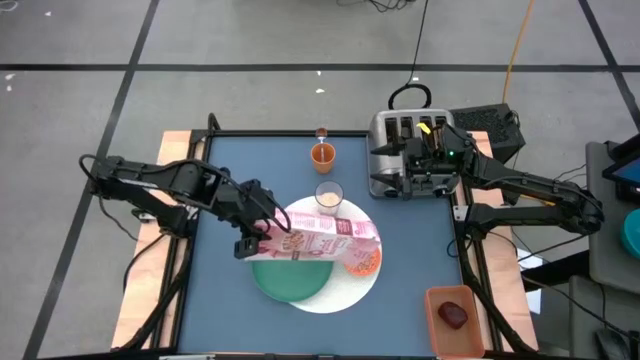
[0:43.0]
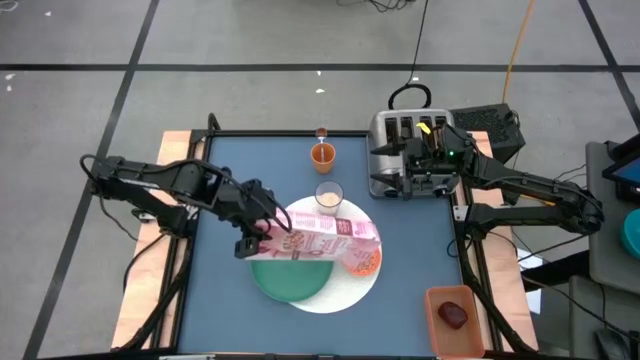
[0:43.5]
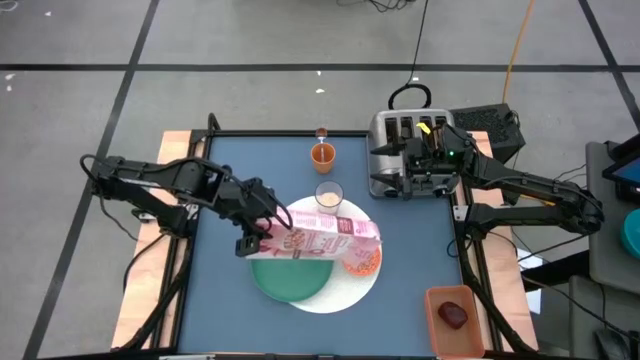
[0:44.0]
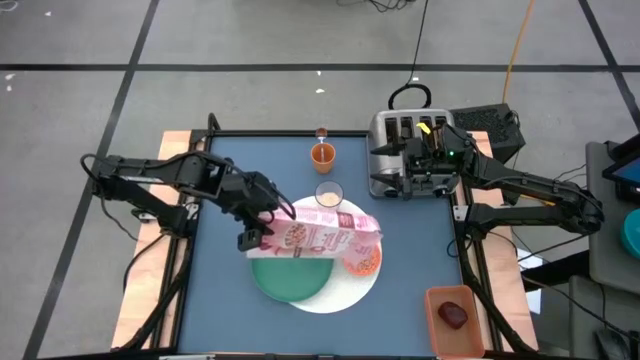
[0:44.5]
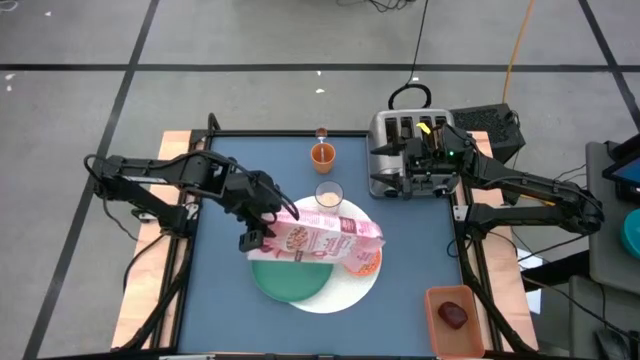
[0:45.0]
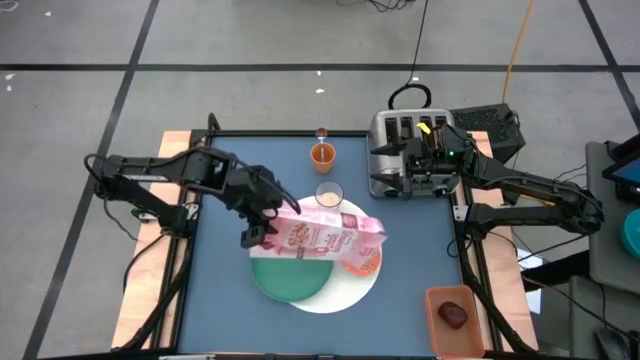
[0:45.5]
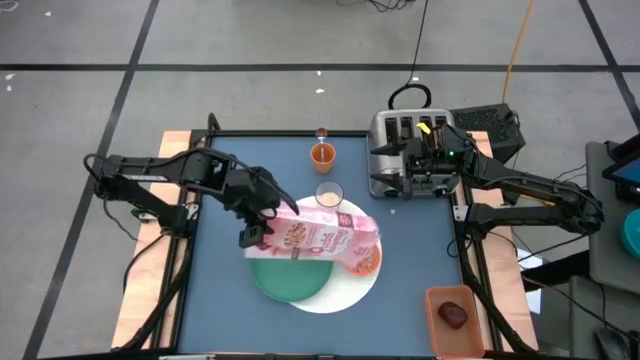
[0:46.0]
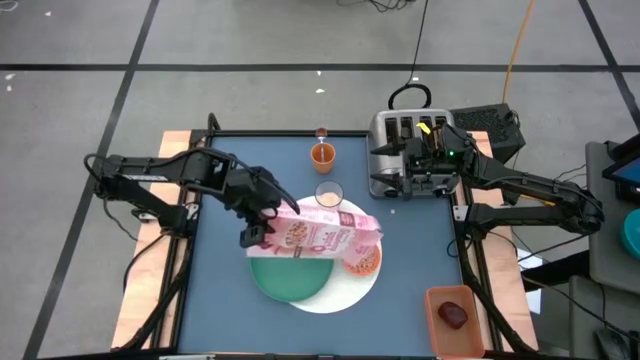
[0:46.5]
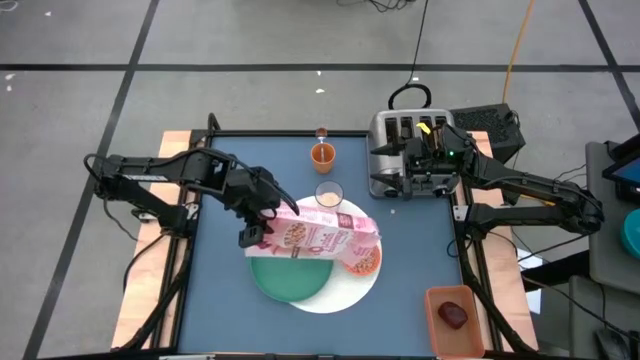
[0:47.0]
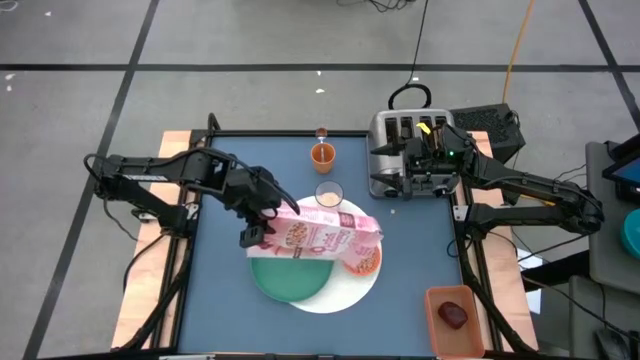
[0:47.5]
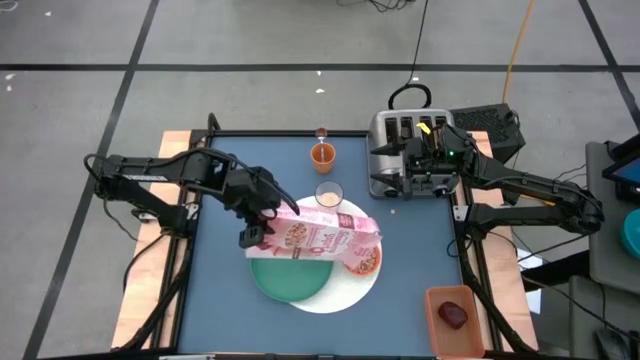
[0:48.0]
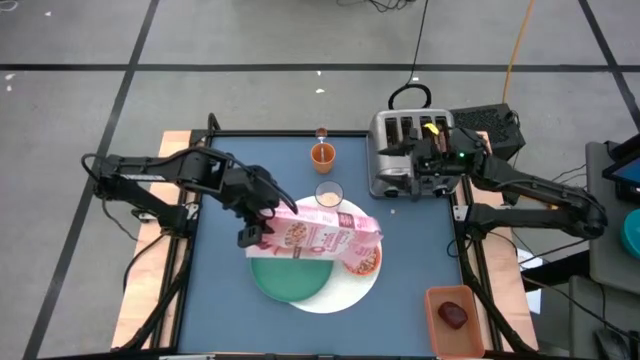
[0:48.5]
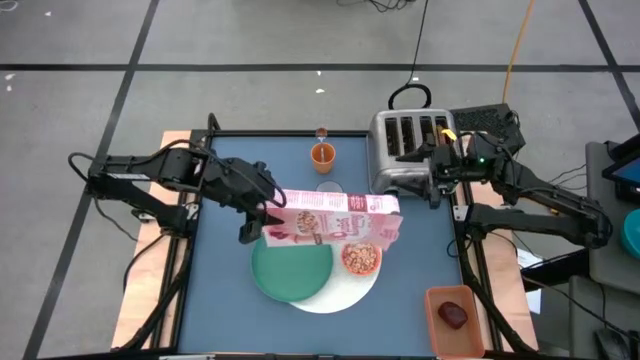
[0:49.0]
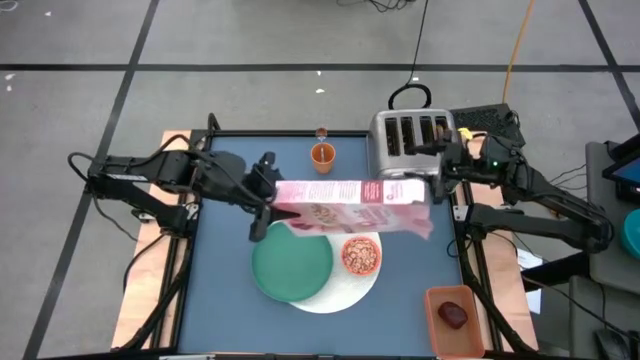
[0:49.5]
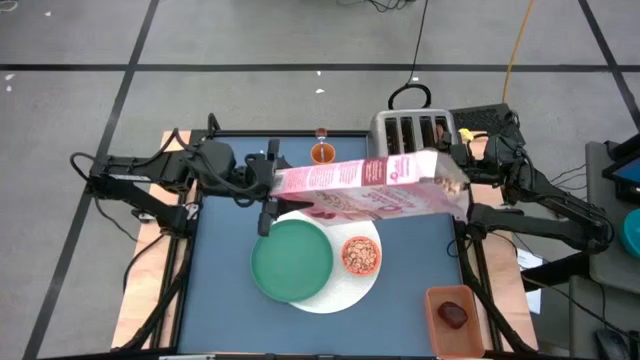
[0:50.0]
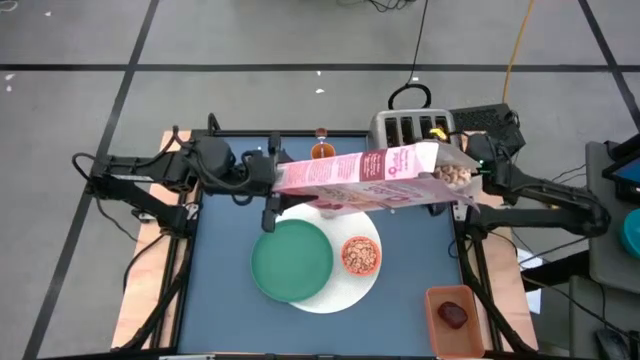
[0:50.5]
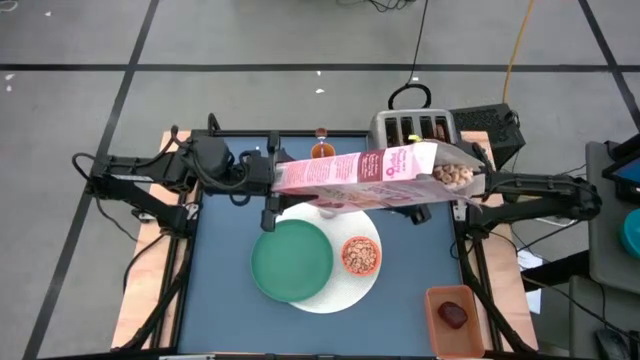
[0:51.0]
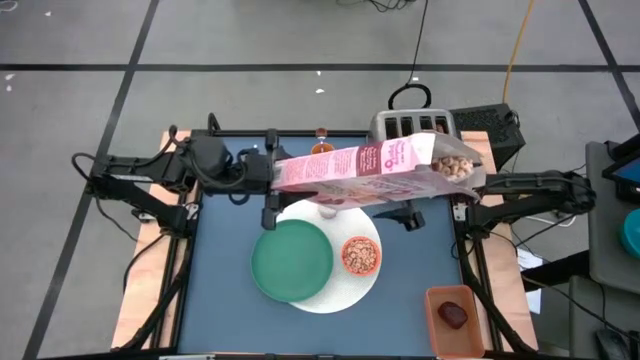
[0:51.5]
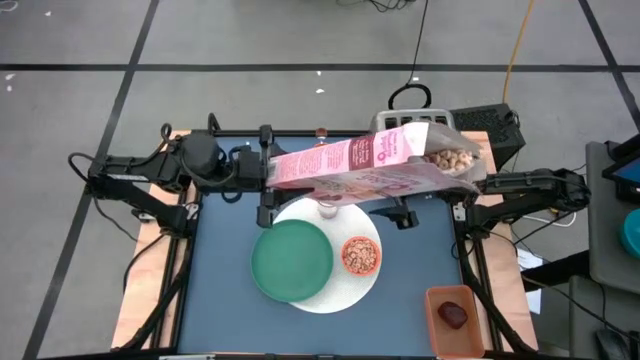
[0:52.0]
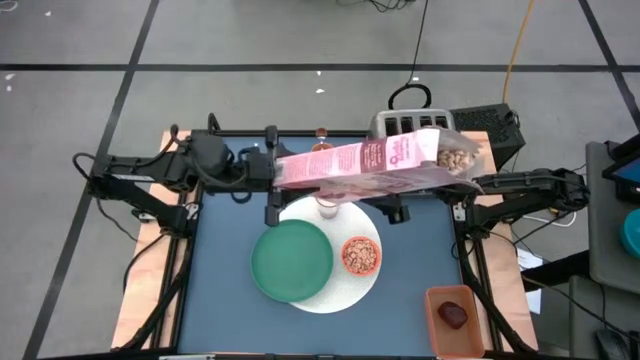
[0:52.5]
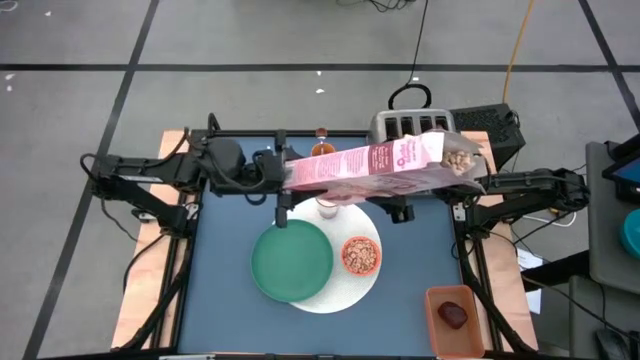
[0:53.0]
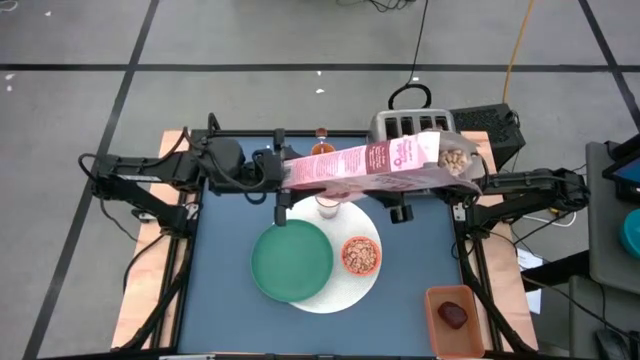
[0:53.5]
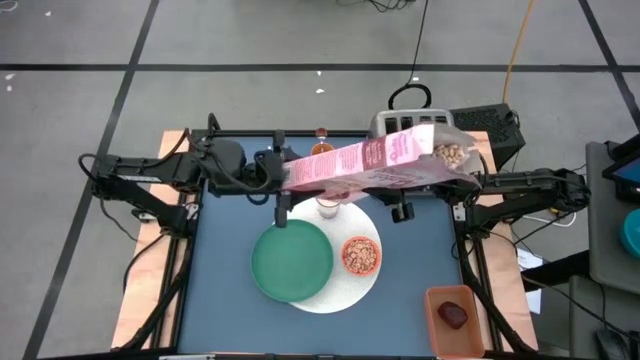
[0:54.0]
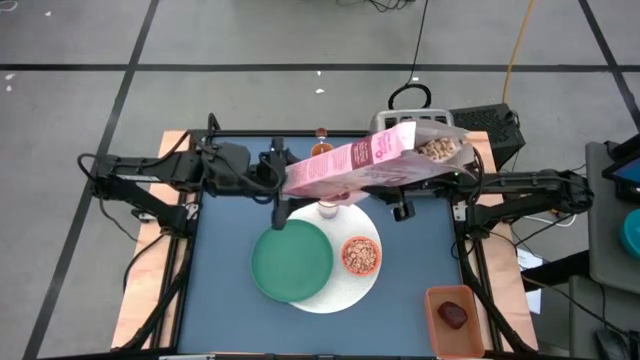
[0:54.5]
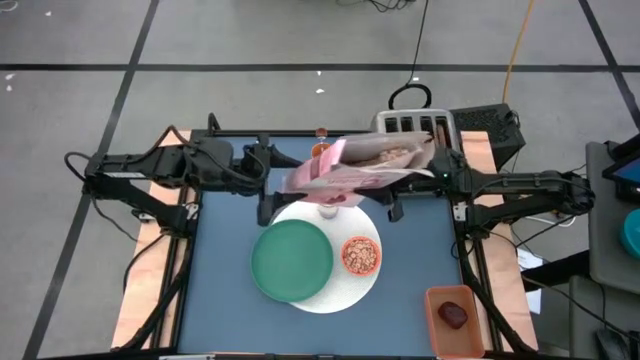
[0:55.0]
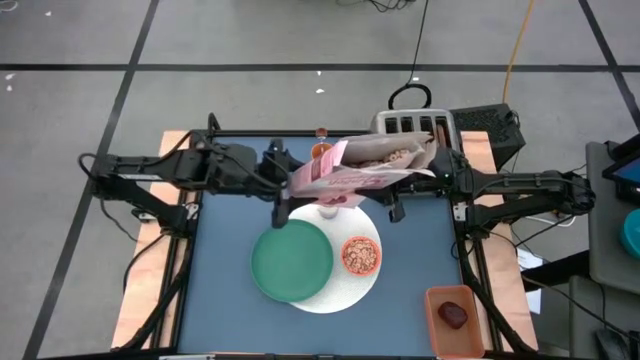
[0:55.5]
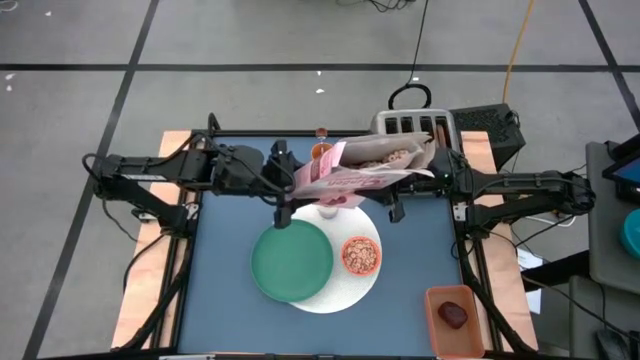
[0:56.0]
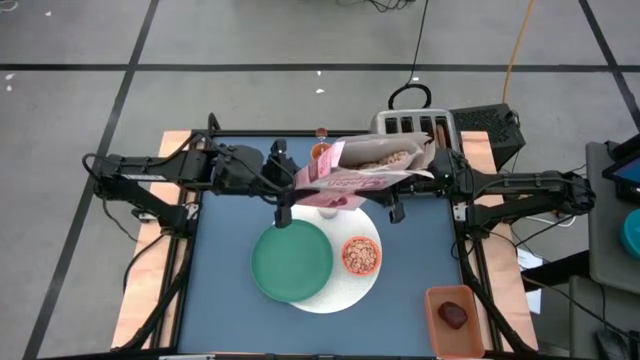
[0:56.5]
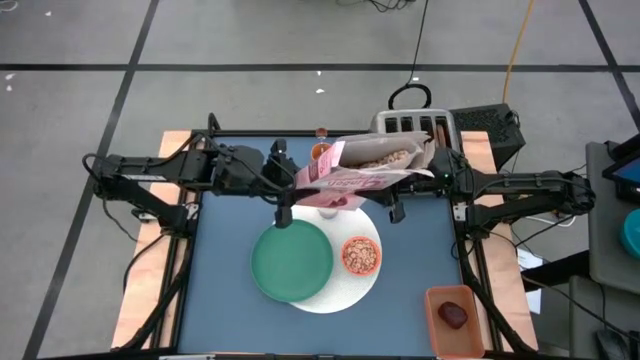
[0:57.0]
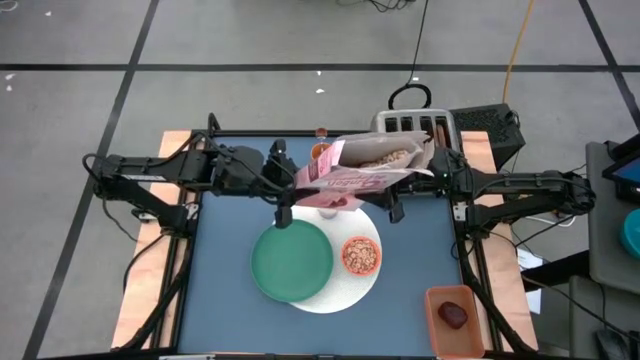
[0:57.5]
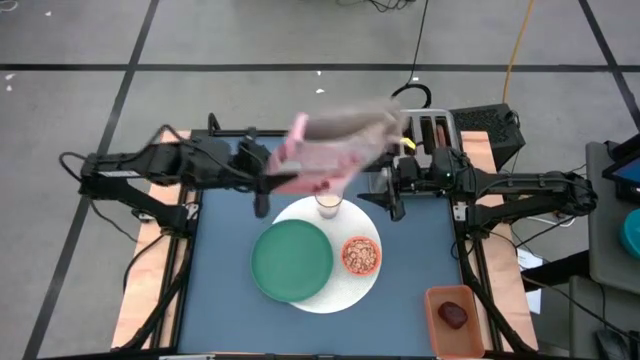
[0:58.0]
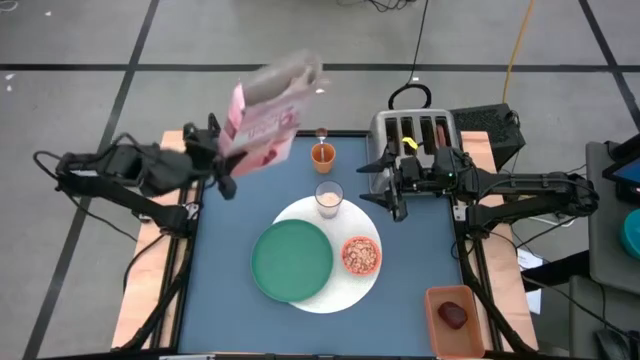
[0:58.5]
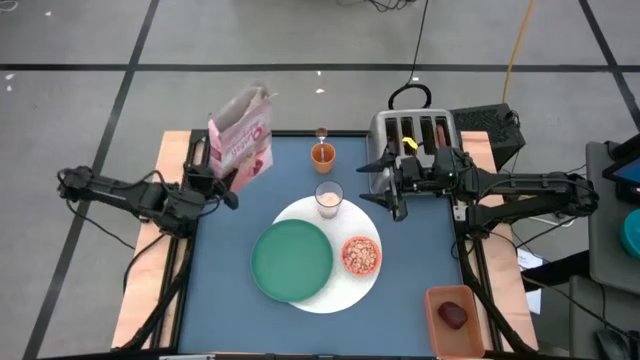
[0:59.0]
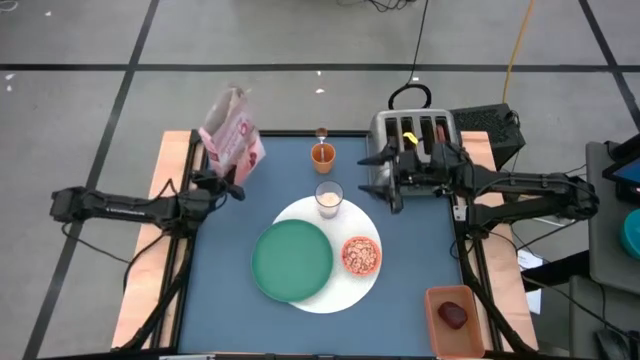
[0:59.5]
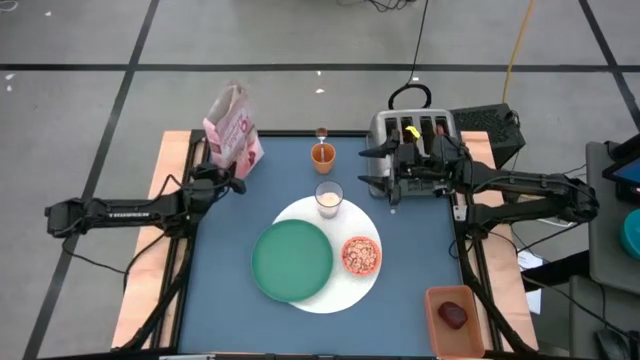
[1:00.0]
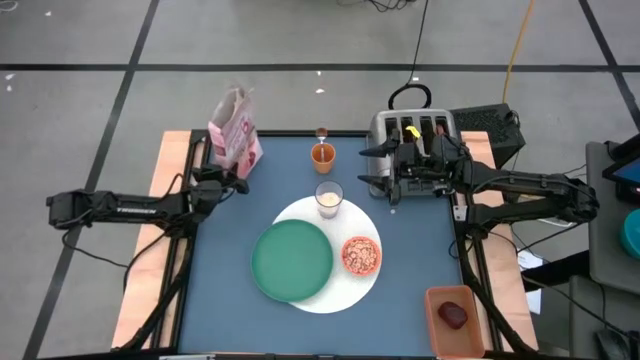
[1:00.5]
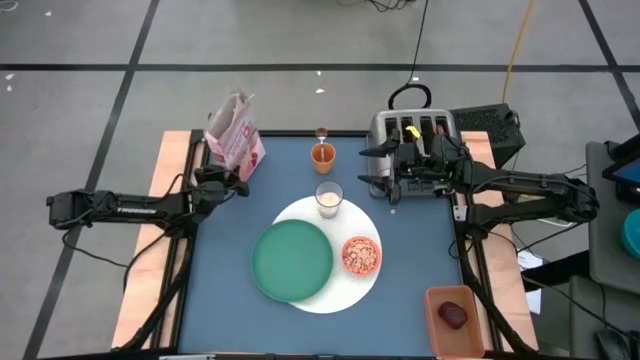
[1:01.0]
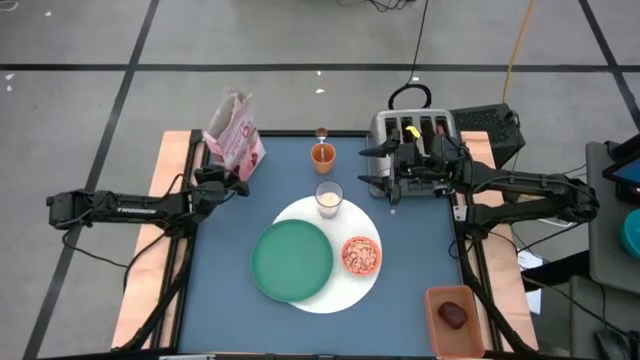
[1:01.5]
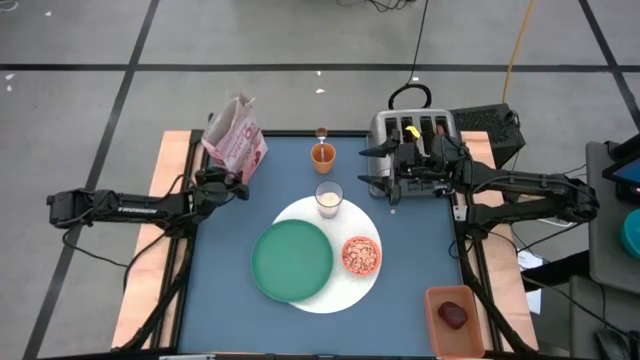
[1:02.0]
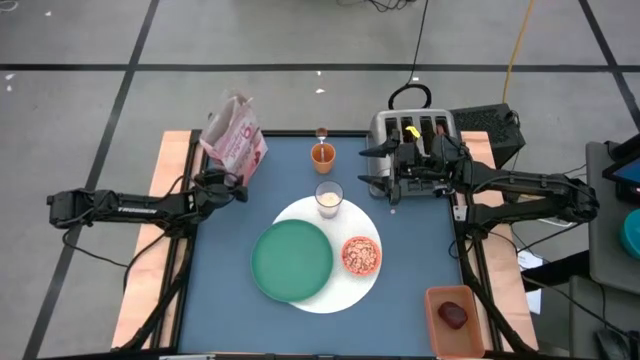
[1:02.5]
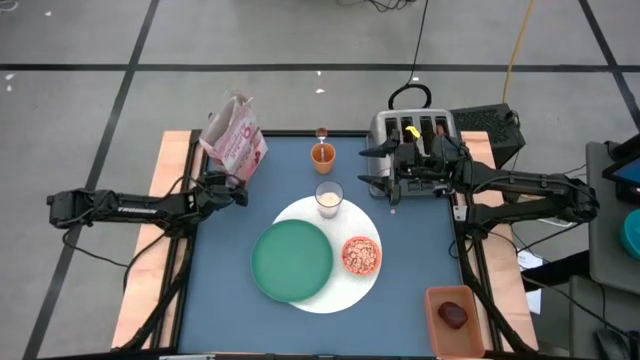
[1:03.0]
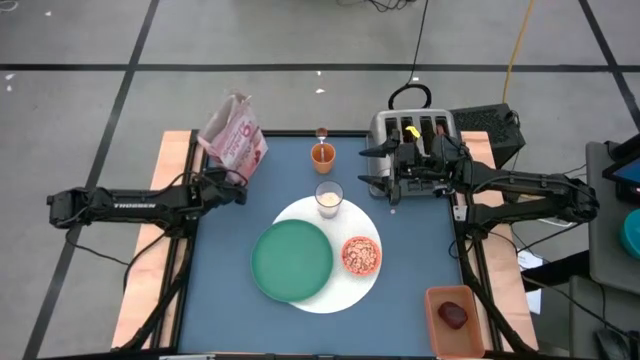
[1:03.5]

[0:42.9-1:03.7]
Task: Arrange a breakfast setting
Pour the cereals from the cereal box into the orange bowl

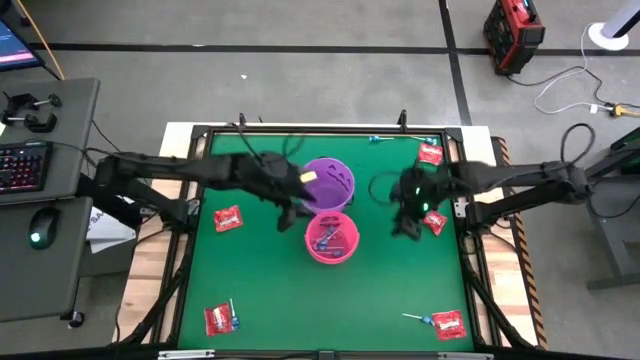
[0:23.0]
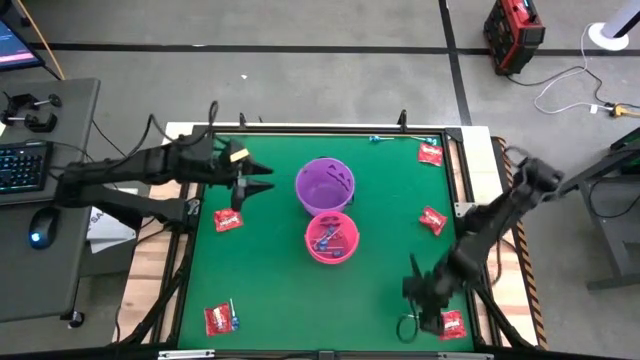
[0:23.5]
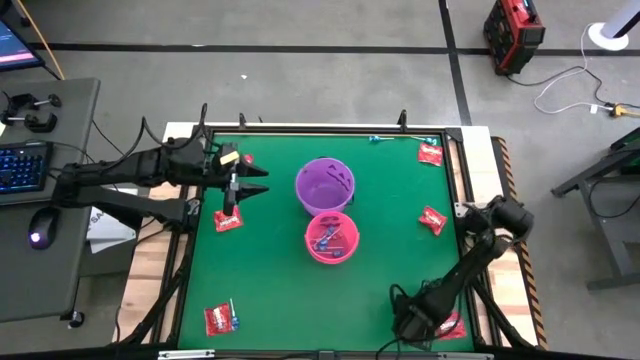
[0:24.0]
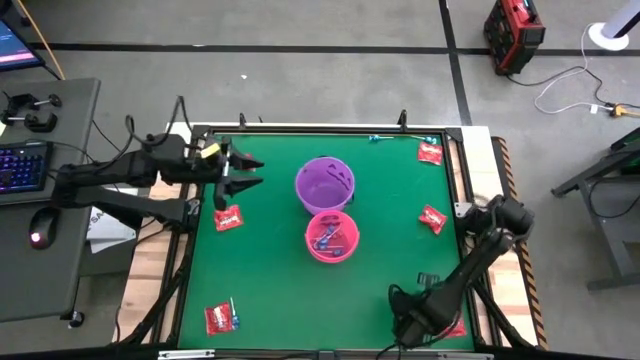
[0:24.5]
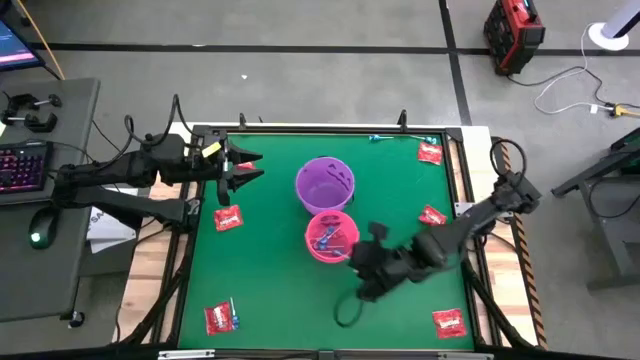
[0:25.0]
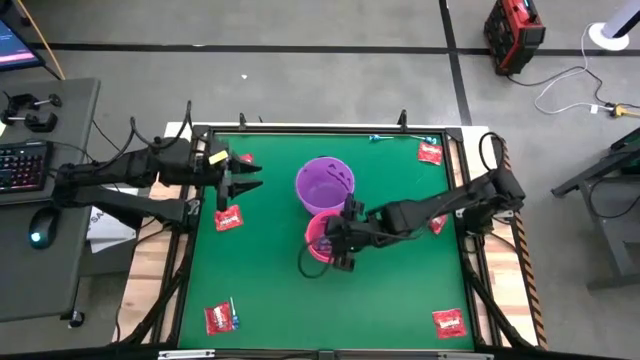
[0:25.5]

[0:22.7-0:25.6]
Task: Sort candy by brand, put in halloween buckets
Put the blue candy into the pink bucket
